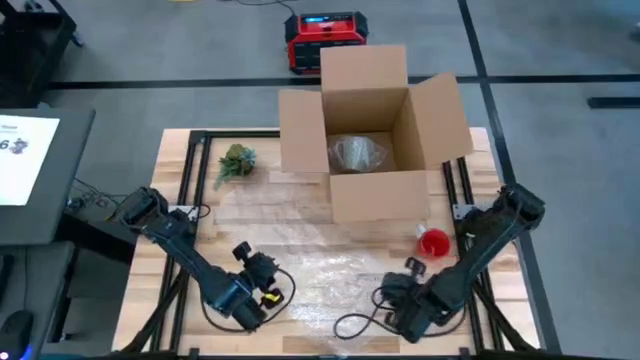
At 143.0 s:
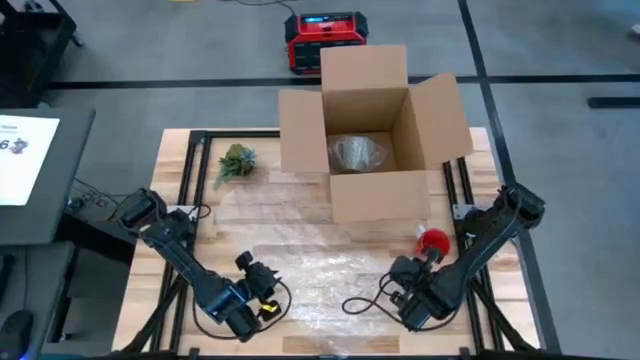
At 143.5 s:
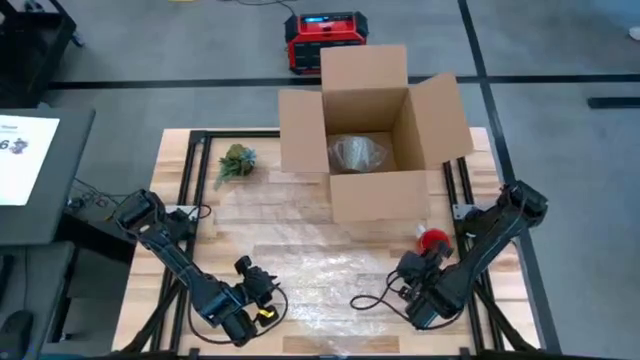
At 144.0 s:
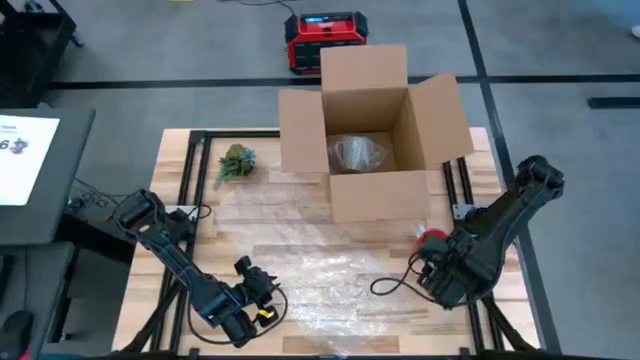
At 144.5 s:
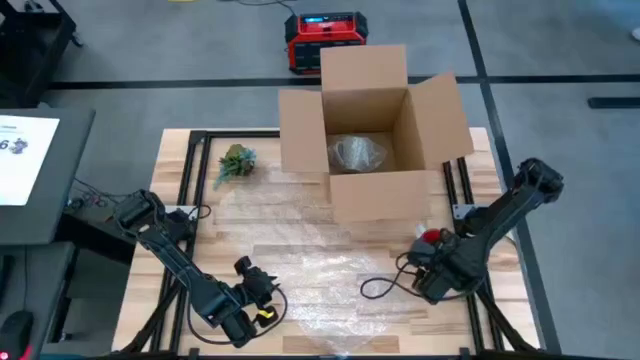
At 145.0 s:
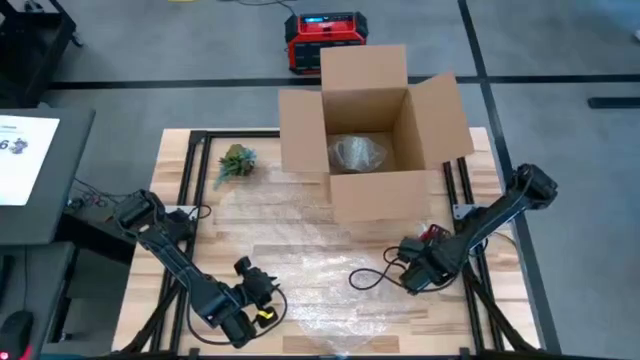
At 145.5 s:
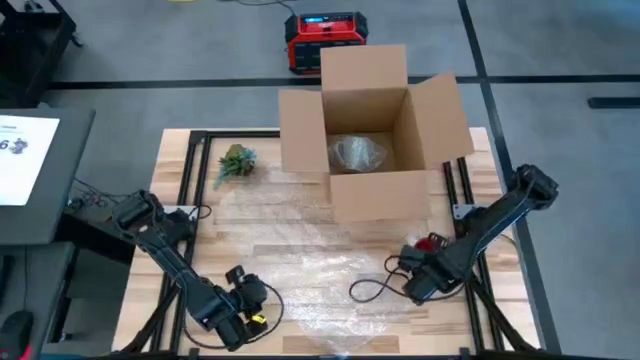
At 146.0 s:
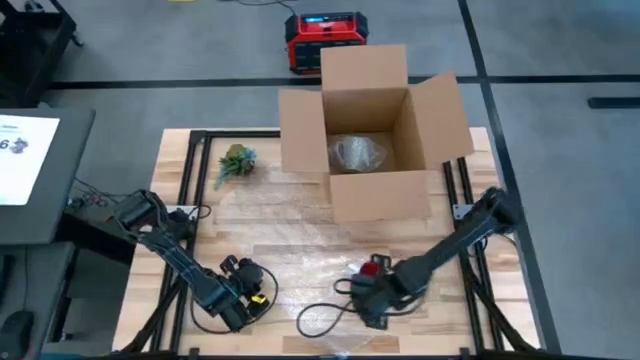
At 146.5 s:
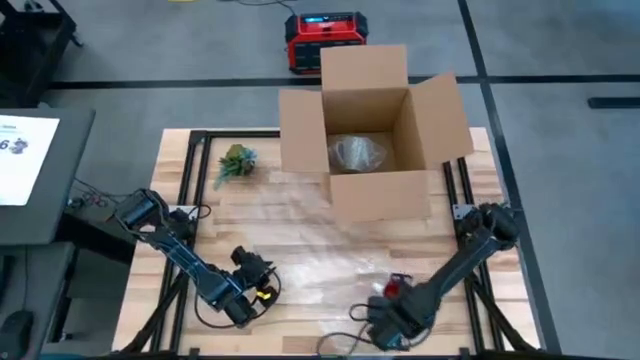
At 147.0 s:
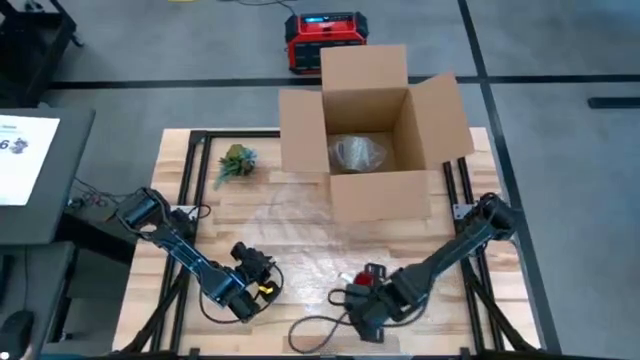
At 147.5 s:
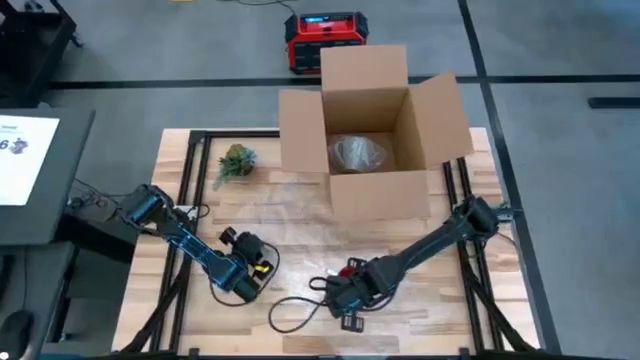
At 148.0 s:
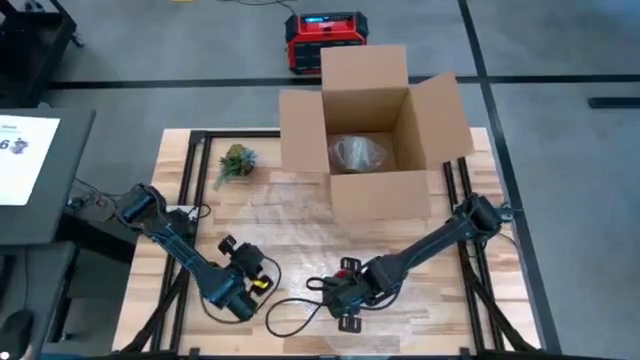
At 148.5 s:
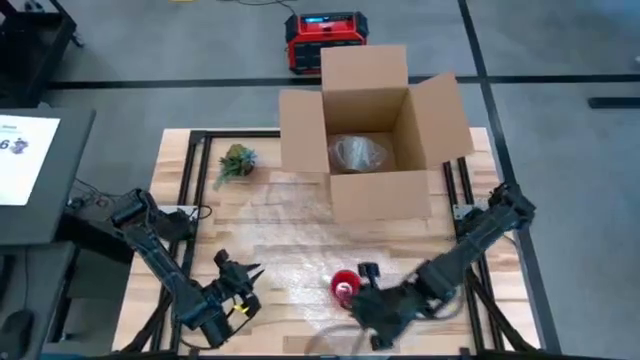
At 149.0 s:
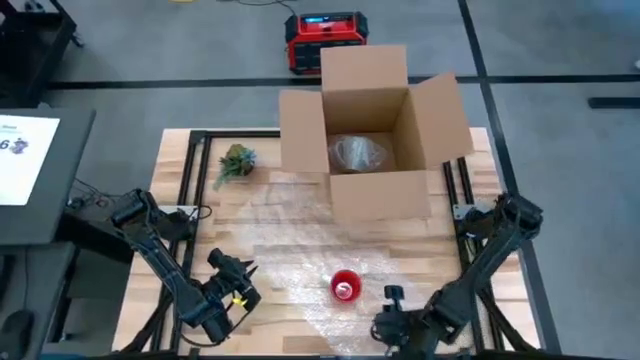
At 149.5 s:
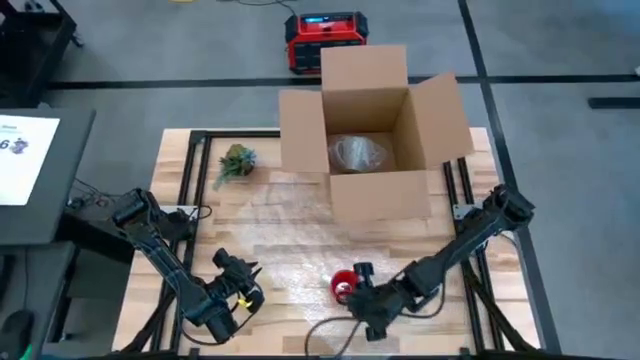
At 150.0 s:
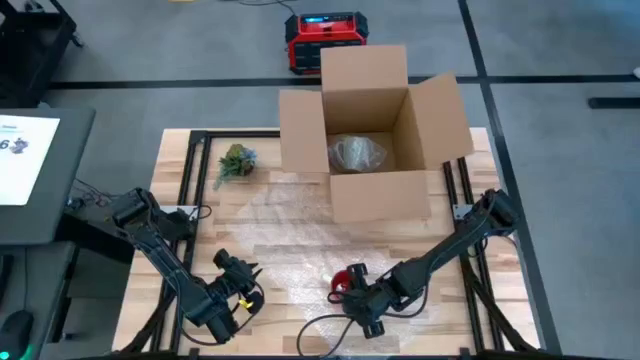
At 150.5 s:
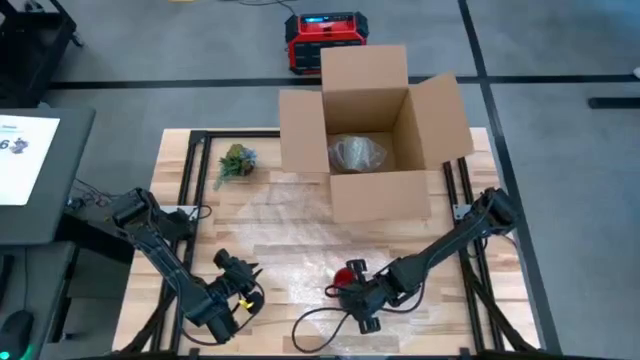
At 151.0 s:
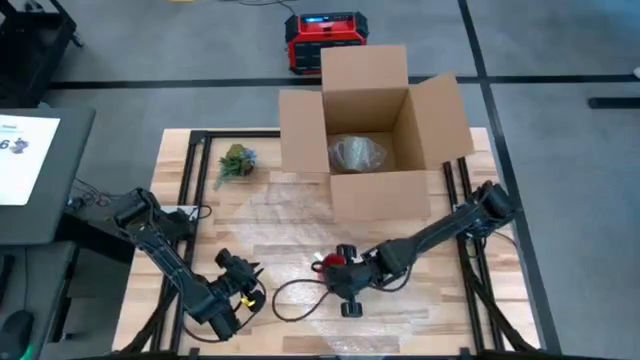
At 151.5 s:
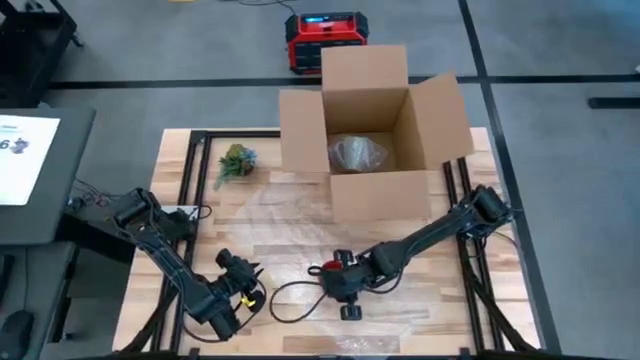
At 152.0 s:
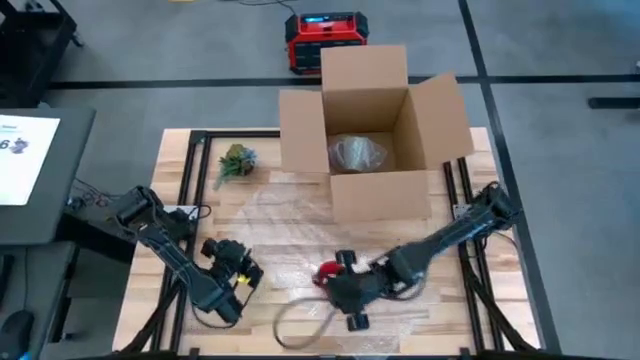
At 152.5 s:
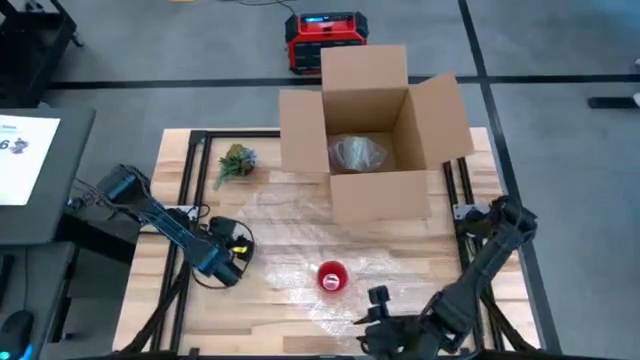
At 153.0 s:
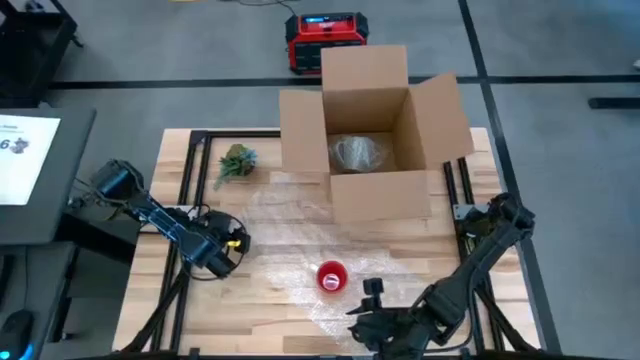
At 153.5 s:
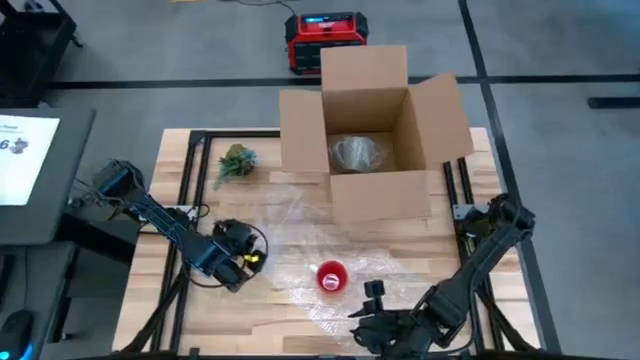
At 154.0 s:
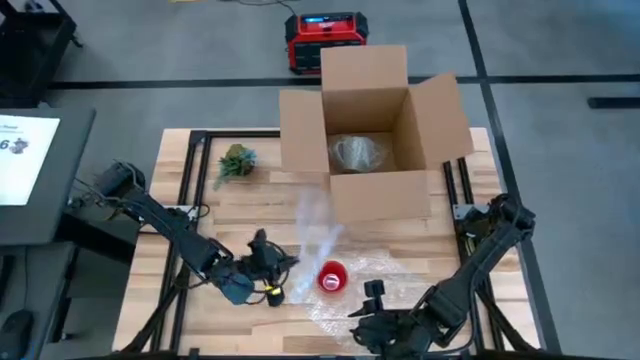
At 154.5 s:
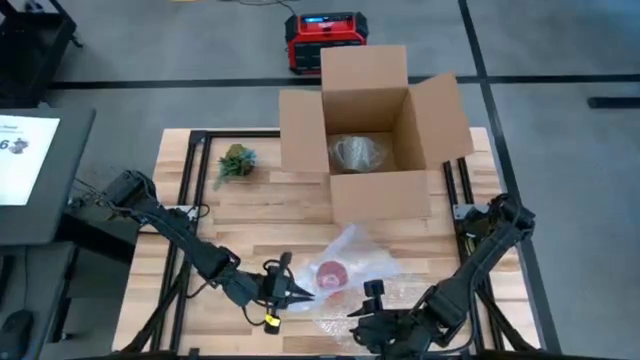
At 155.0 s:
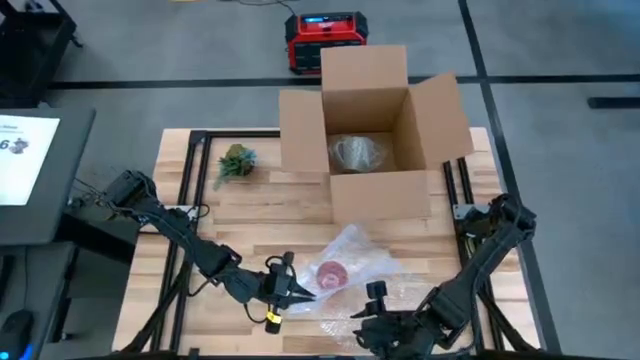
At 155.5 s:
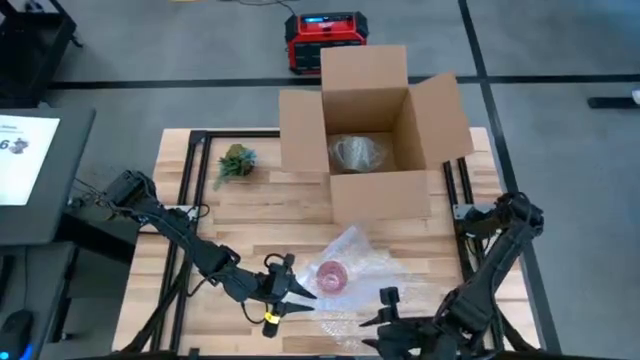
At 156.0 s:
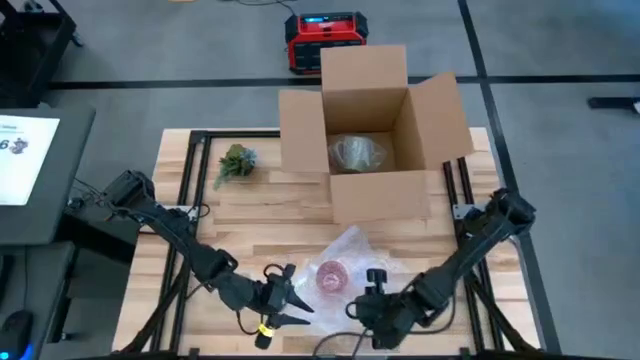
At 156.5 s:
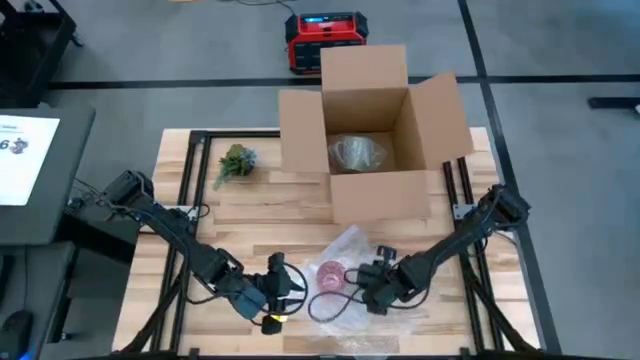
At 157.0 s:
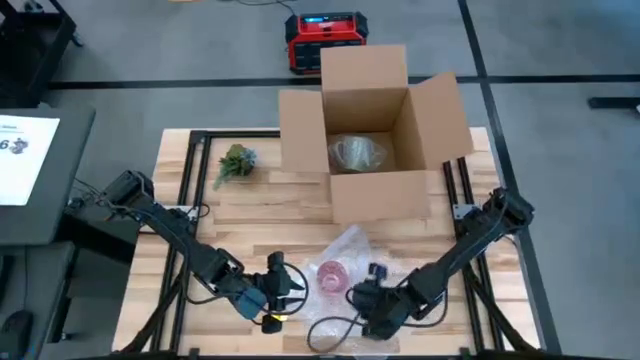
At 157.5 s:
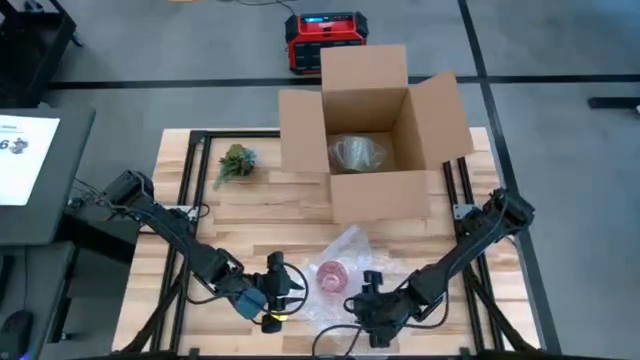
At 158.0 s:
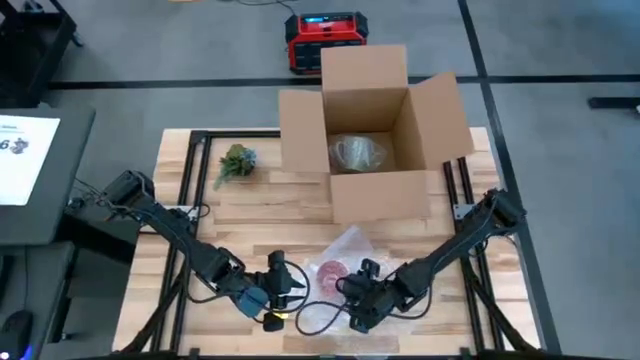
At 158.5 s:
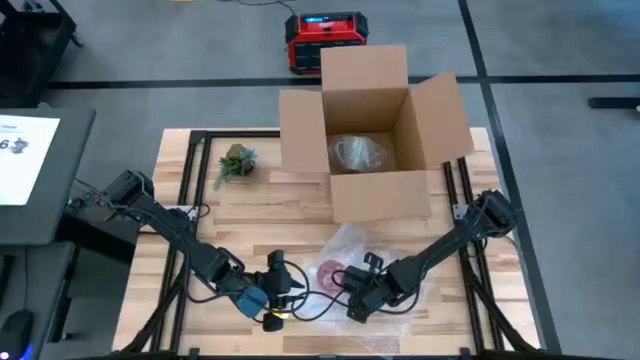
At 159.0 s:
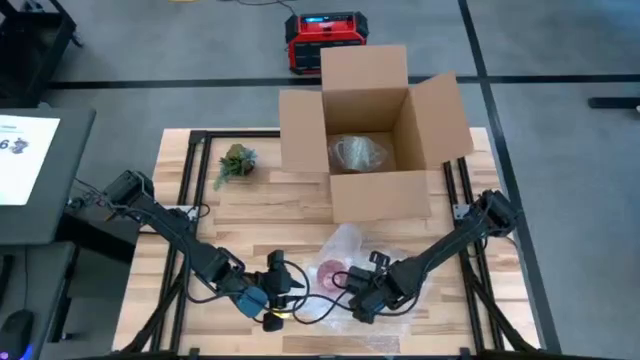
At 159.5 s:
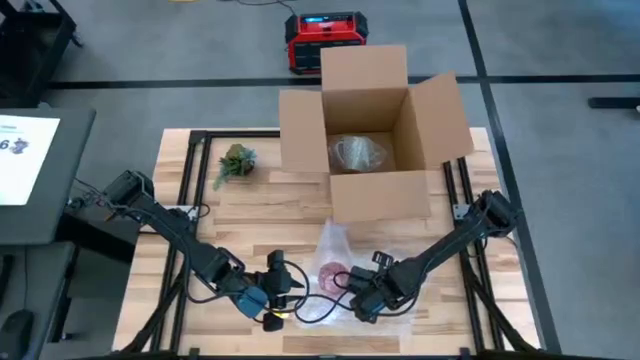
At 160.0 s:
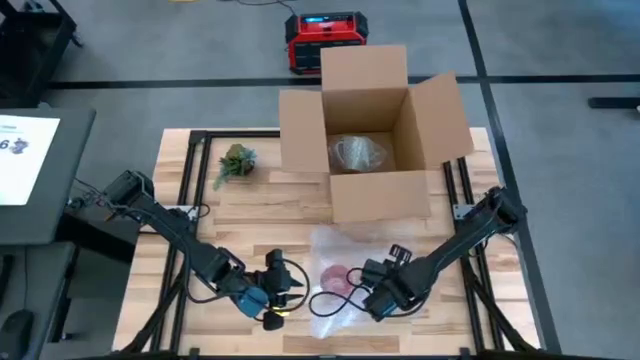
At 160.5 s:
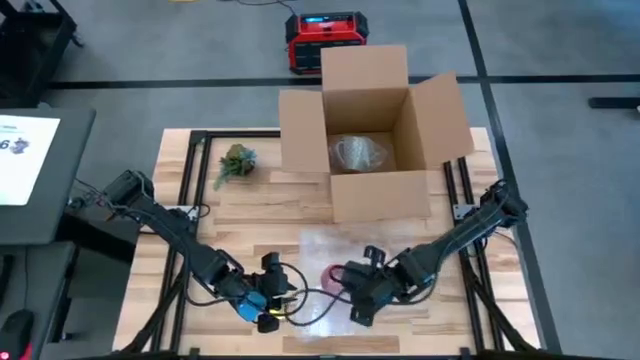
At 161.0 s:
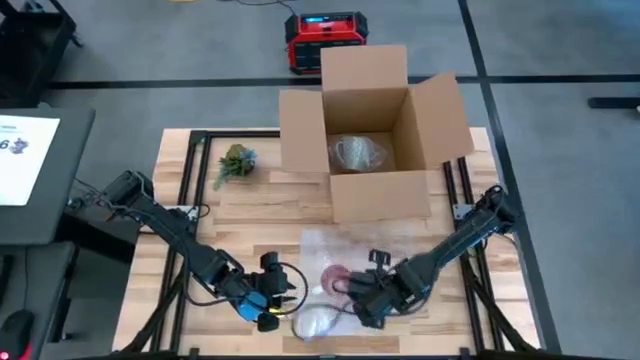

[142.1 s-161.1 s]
Task: wrap mug
Wrap the red mug with the transparent bubble wrap

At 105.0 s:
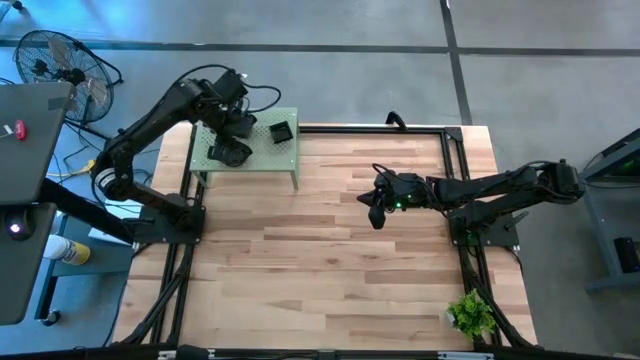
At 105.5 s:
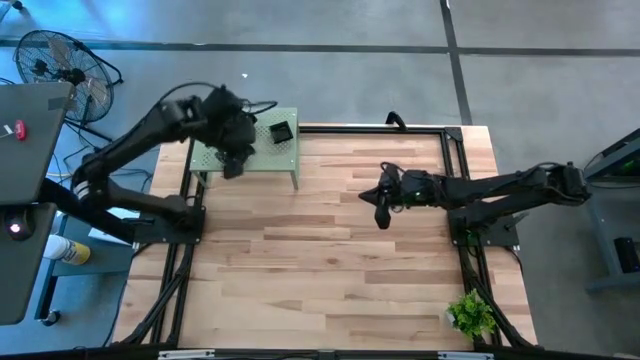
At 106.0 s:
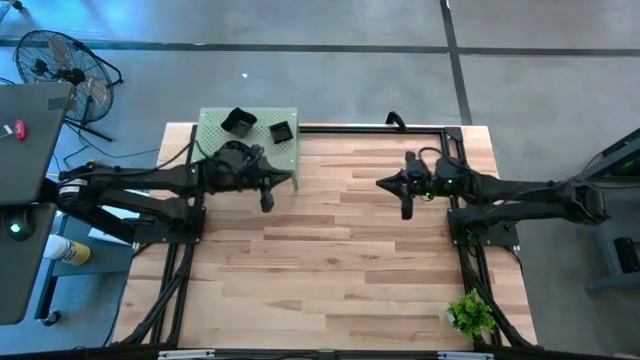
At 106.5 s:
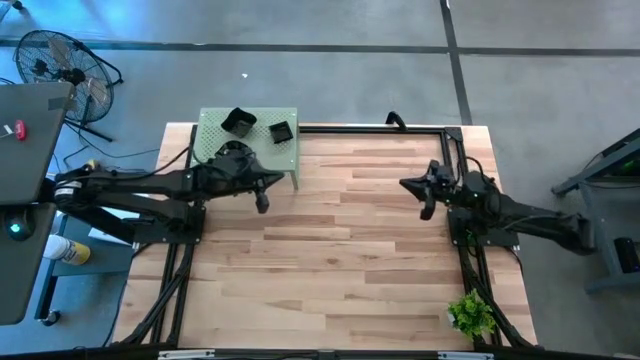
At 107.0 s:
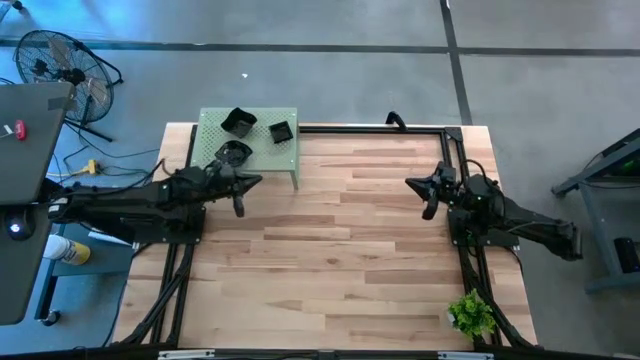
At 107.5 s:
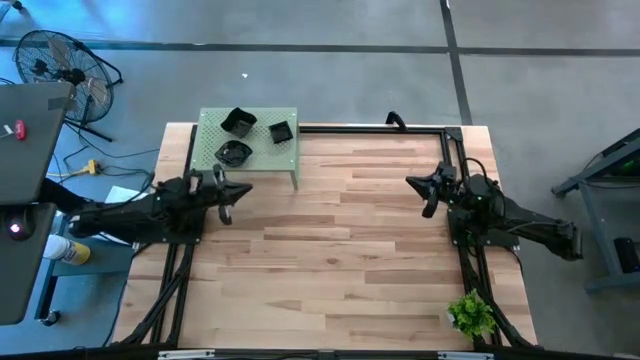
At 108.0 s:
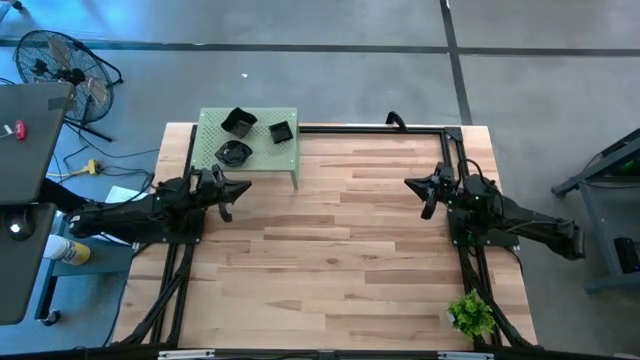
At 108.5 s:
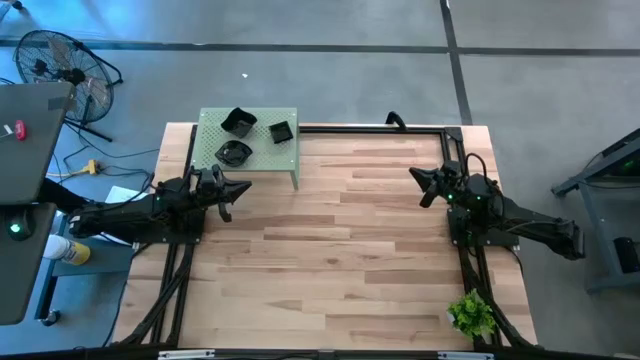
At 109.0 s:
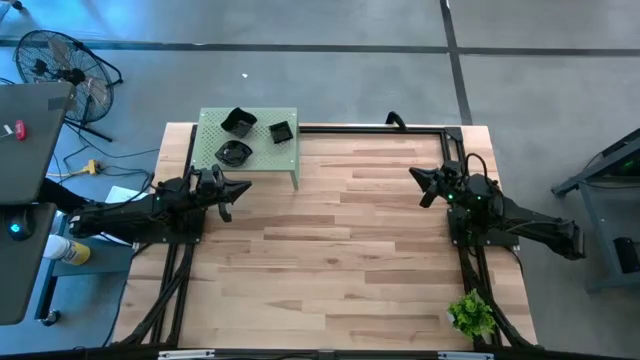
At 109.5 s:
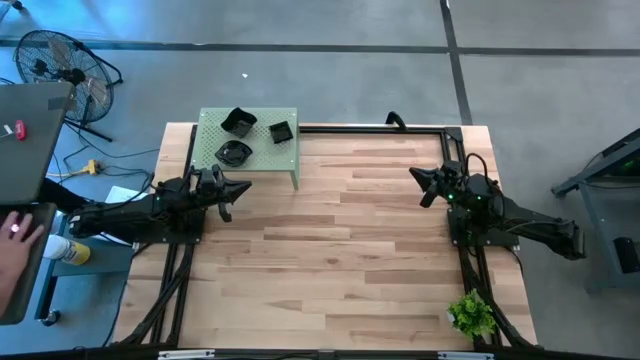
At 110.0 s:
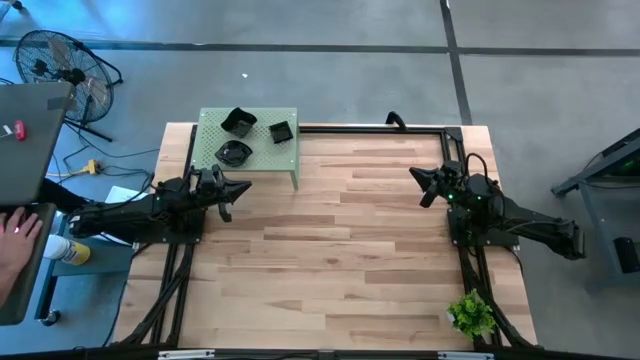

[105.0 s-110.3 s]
Task: Pick & Place Mini shaped plates
Return to Home Position
